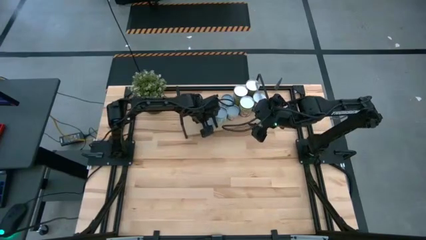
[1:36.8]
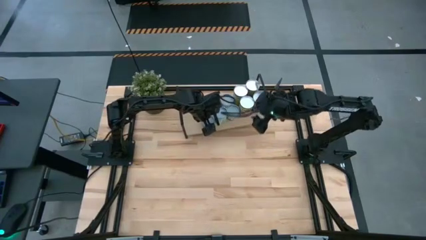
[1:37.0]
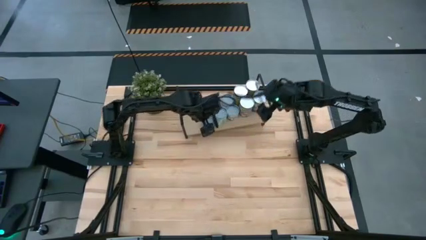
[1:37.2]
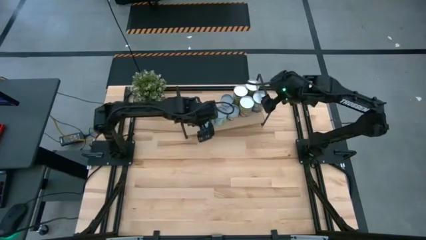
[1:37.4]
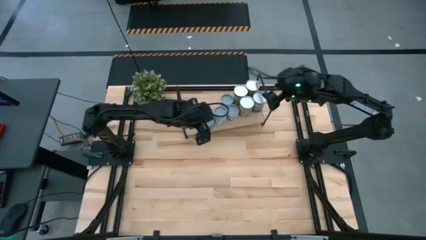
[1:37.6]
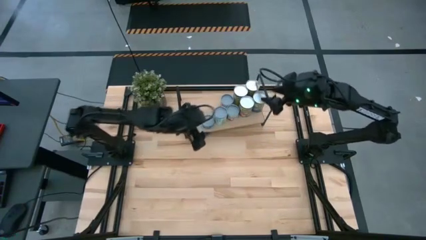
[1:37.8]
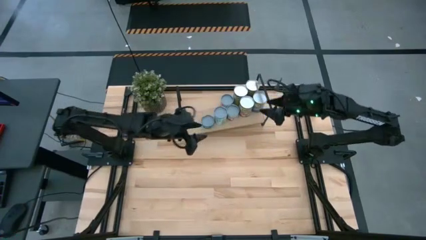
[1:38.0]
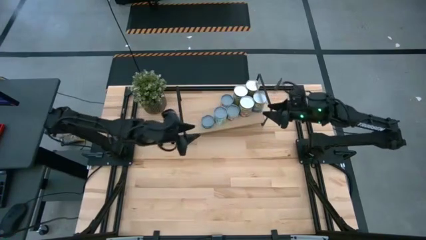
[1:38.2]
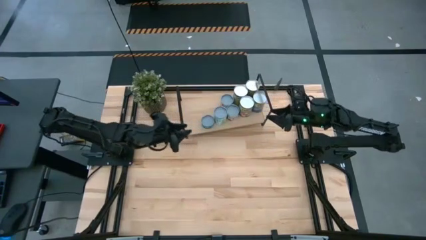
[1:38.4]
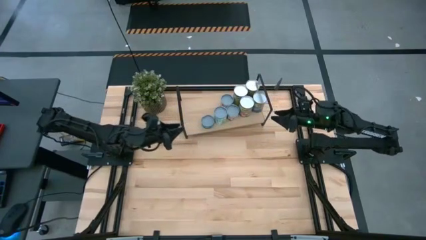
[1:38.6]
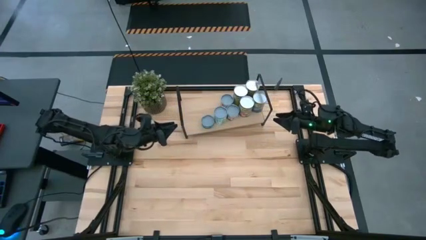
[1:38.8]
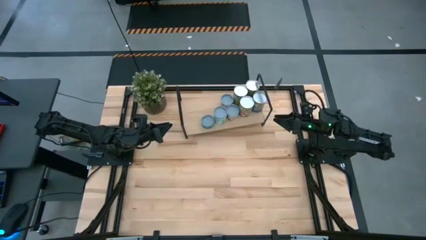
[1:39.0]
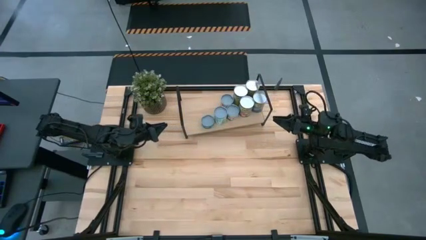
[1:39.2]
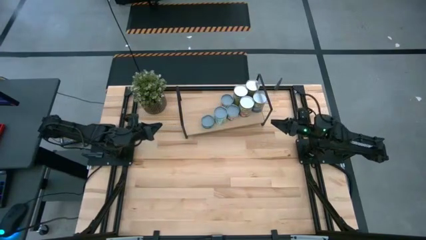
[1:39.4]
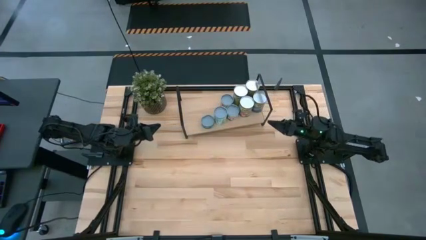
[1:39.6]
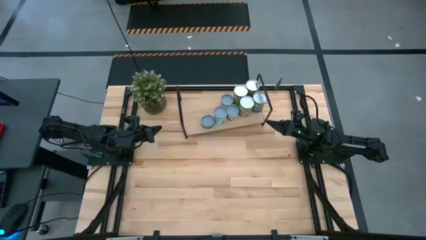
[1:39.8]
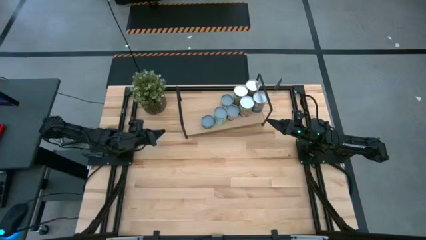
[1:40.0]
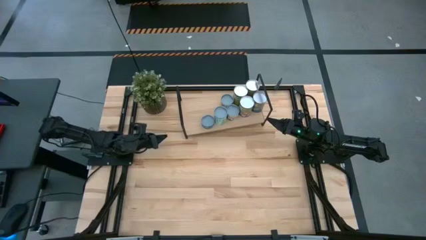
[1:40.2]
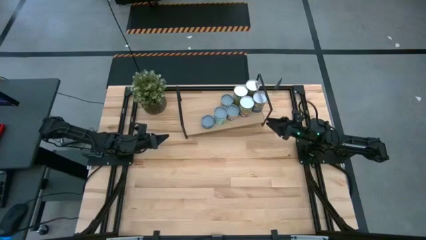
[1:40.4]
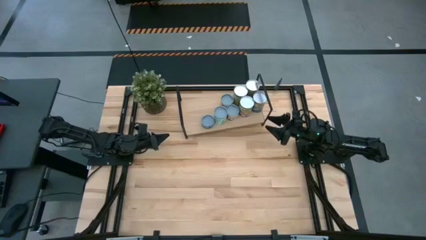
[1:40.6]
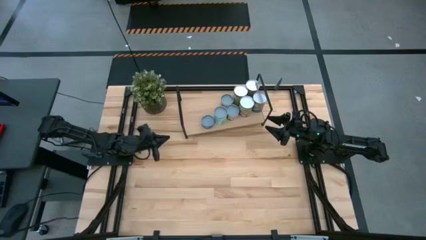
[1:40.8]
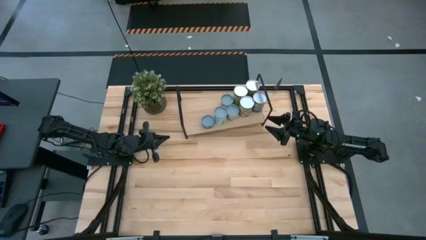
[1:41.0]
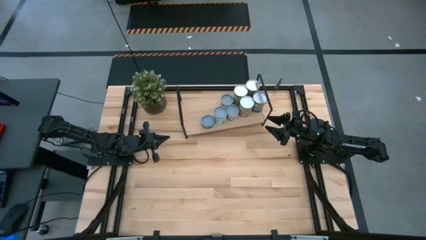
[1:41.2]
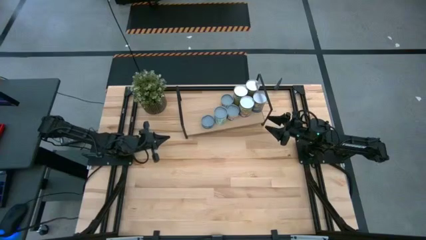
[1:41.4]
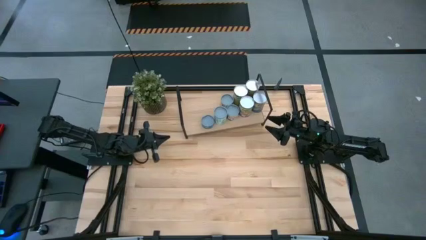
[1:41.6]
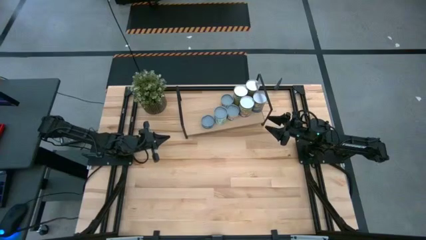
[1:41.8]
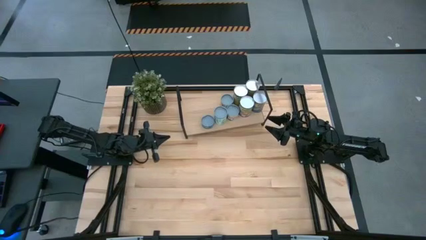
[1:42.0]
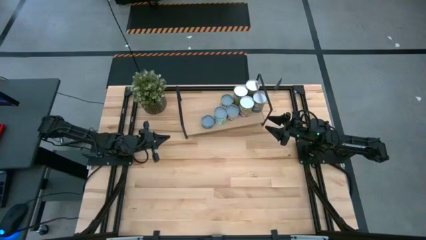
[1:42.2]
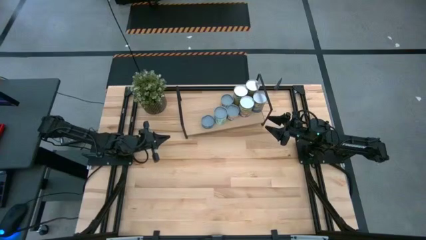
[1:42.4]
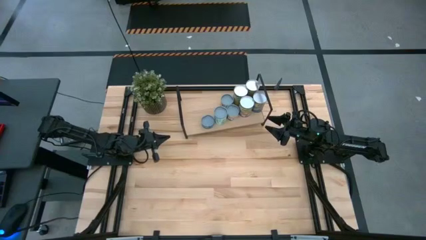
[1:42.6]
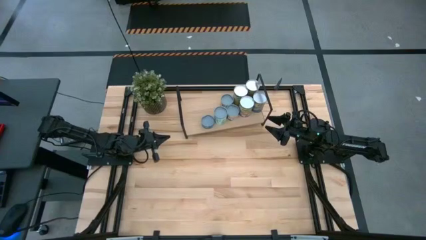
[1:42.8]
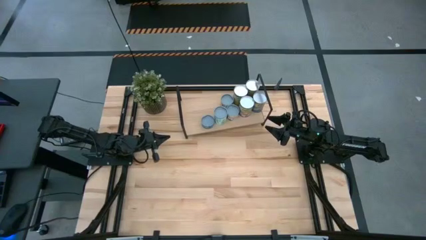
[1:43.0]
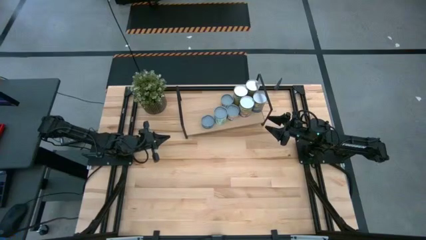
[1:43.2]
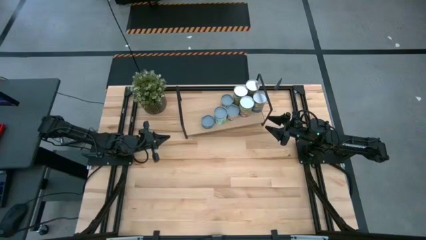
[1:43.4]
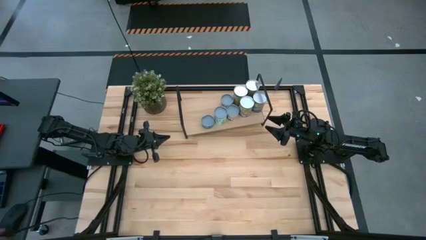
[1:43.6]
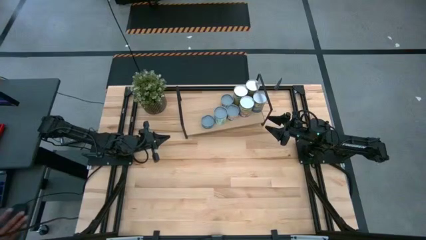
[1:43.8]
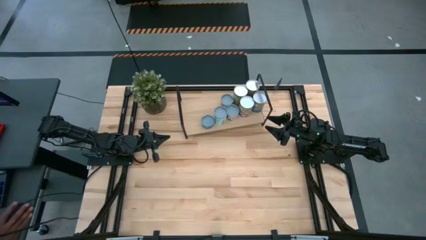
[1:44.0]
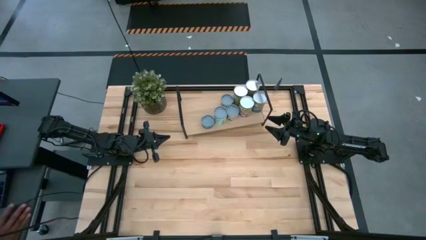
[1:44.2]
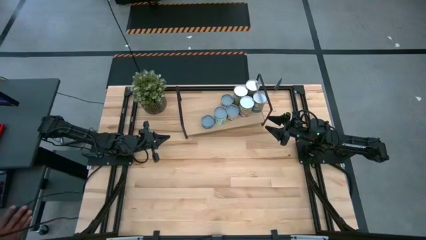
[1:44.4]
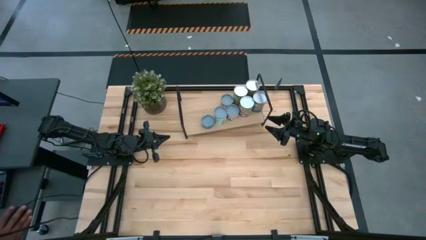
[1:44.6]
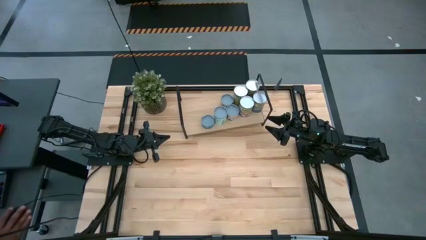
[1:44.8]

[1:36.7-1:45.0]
Task: Pick and place cans onto a shelf
Return to Home Position

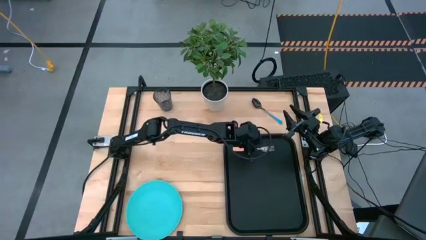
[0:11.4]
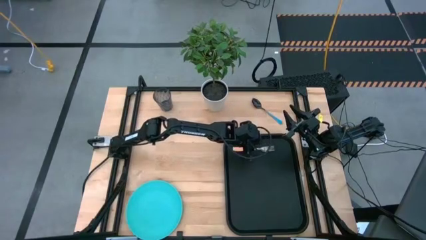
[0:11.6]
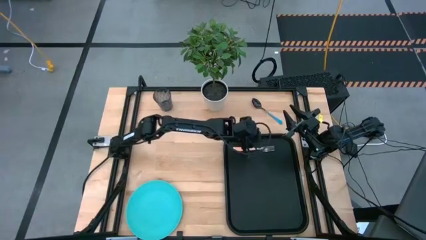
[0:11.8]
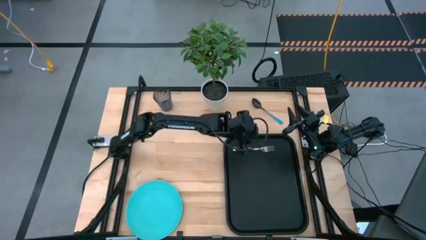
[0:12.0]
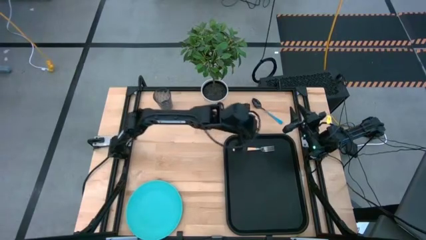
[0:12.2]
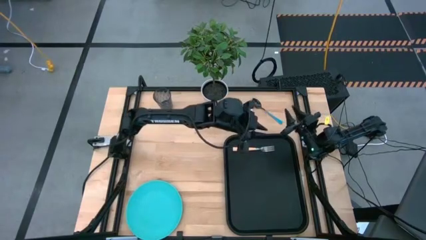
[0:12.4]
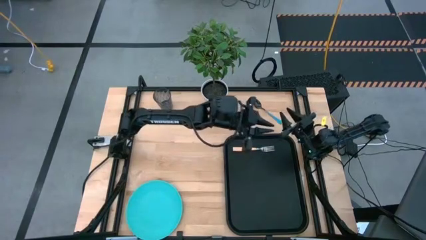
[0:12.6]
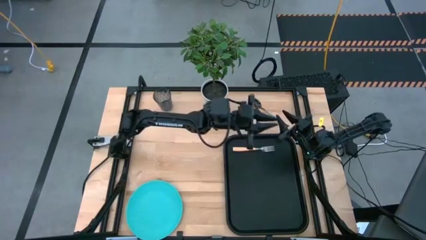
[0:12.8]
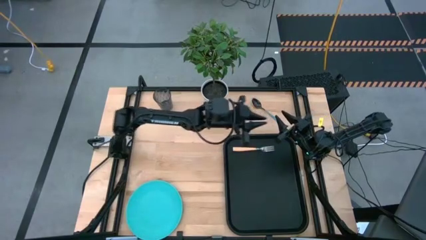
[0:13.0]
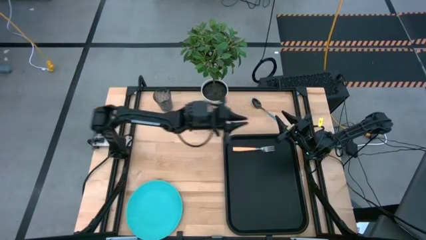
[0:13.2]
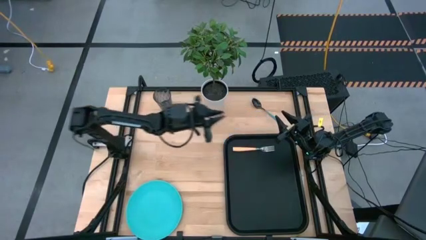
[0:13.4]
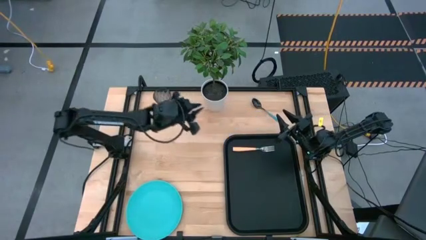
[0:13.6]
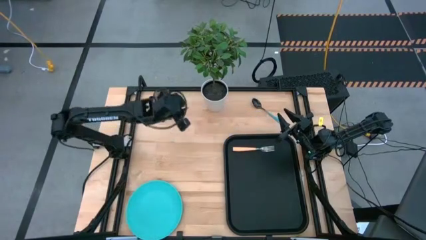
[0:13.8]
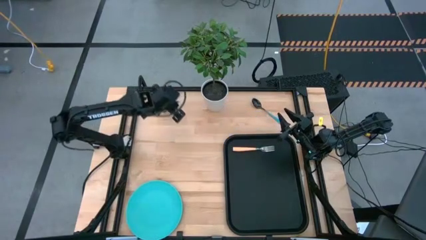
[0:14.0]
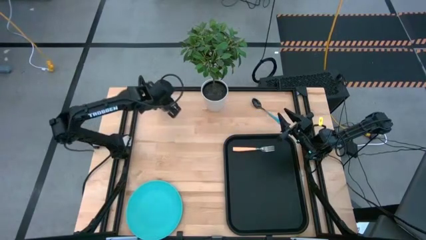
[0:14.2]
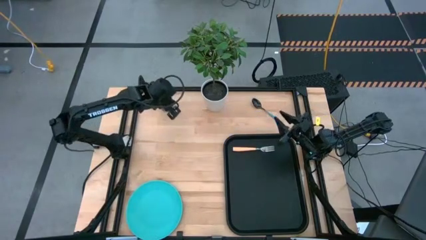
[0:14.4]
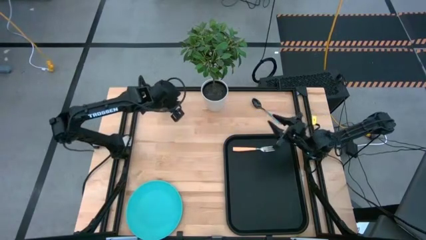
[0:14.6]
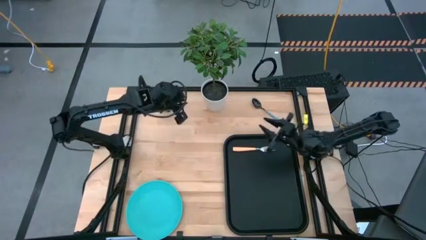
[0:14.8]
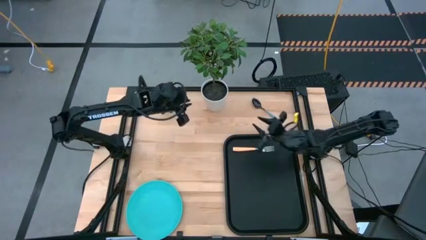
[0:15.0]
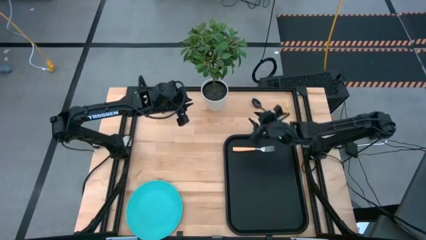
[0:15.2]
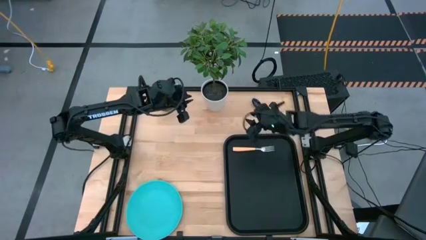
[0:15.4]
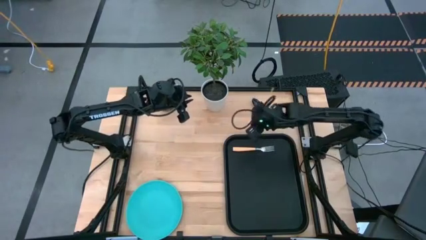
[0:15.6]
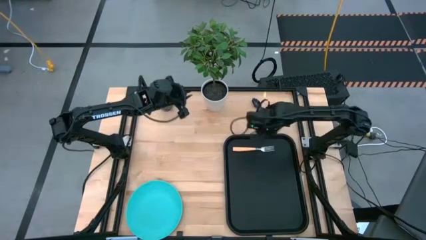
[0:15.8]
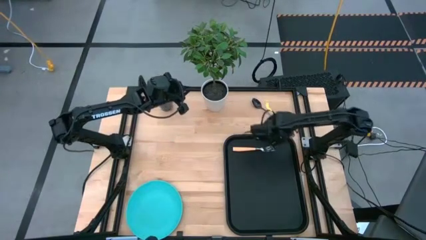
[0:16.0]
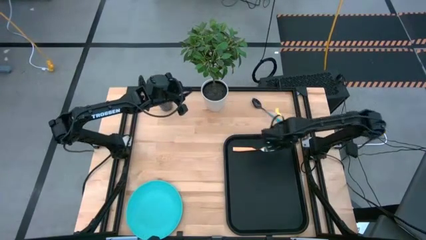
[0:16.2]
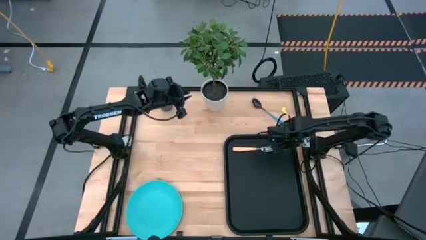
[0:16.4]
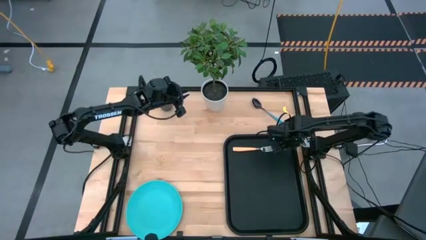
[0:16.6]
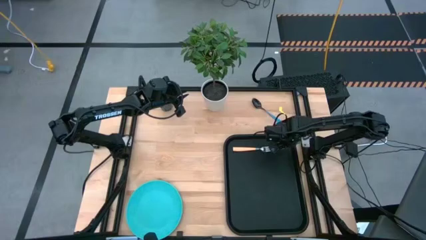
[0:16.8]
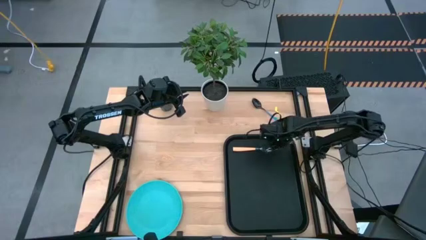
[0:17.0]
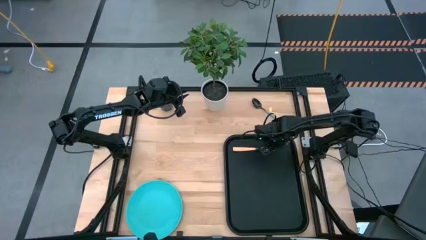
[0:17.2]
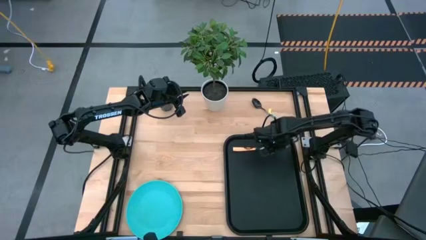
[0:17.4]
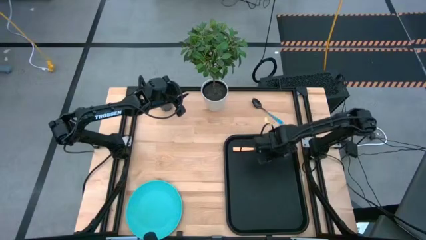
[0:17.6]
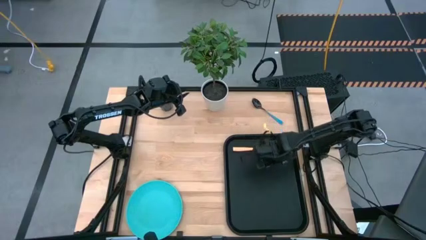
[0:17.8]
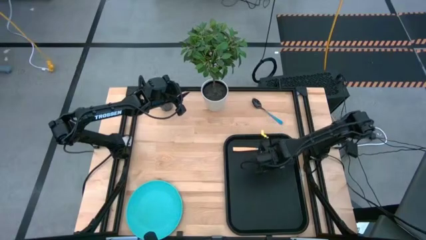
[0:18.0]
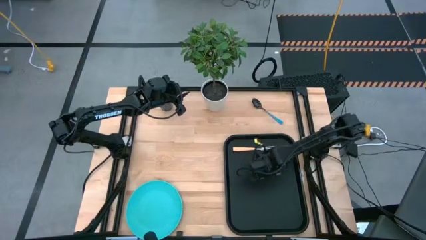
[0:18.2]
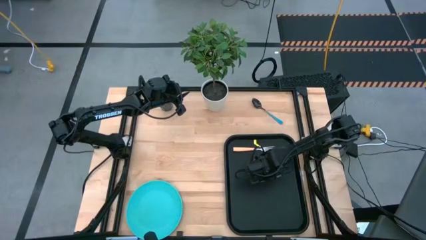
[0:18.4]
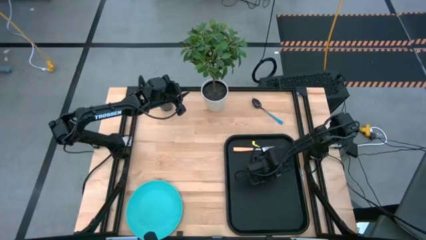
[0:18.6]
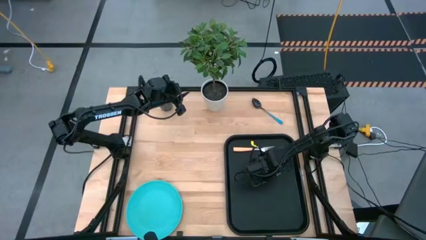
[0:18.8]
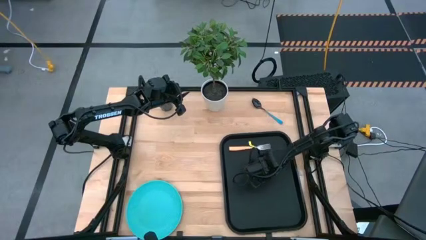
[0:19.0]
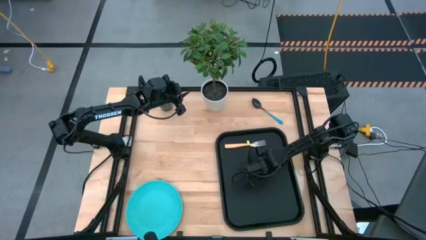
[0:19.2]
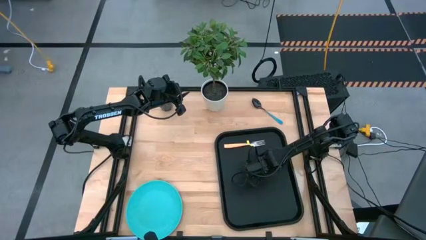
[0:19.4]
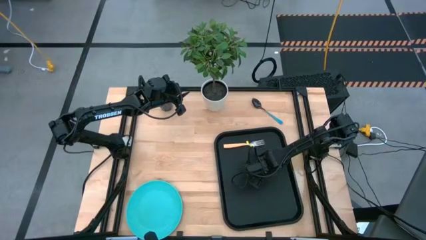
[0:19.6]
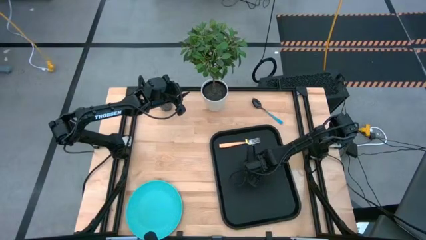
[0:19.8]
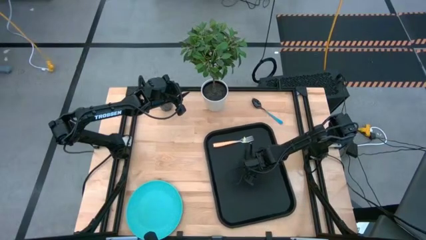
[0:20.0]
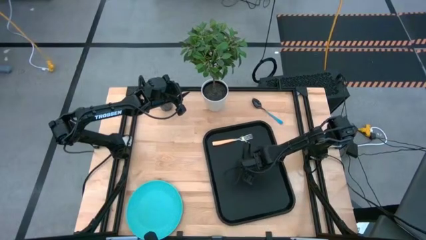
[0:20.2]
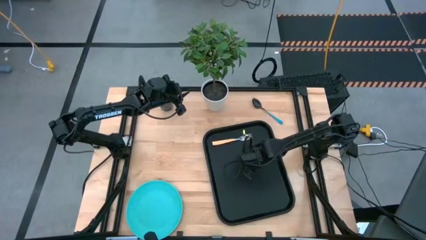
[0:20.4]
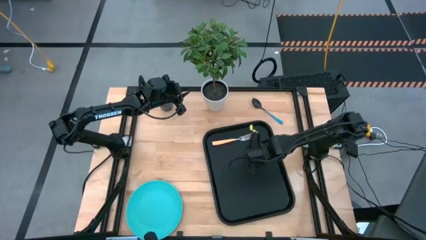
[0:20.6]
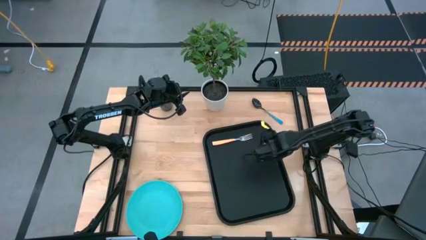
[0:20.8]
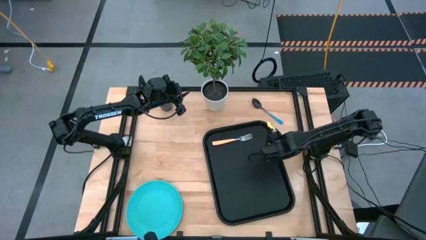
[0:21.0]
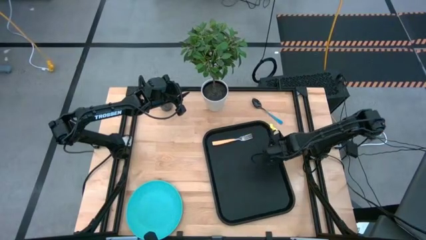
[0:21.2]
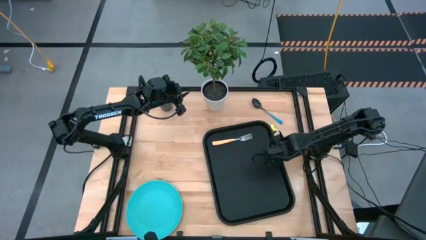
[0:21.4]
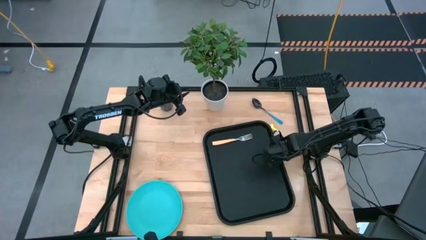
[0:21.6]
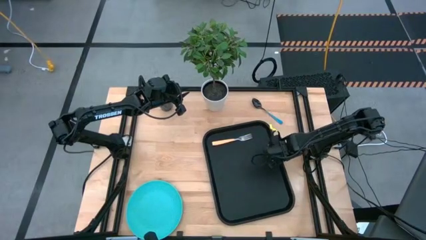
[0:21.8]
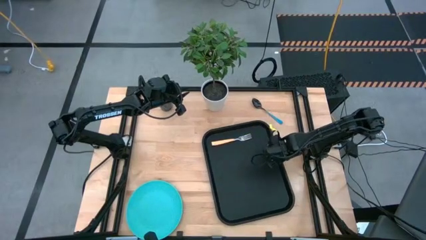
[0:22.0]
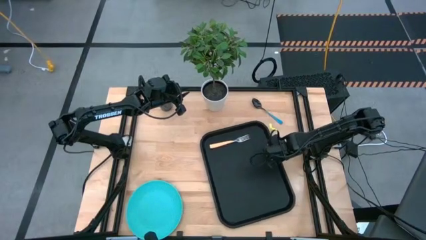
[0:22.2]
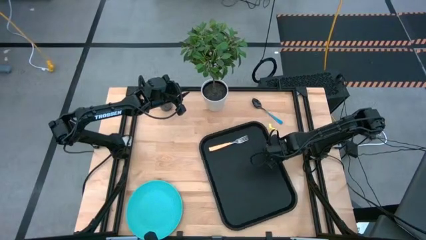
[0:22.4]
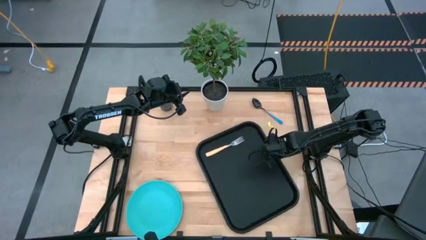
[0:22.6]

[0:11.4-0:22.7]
Task: Pick and place plate/cup/fork/spoon on tray
Move the black tray to the center of the table
